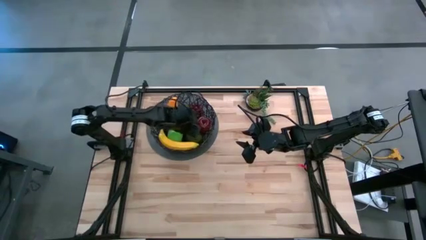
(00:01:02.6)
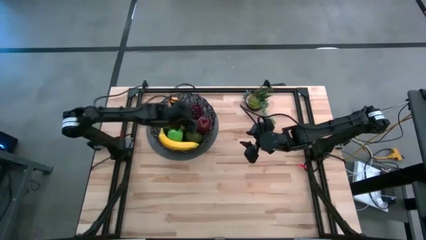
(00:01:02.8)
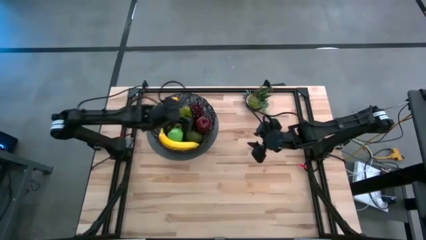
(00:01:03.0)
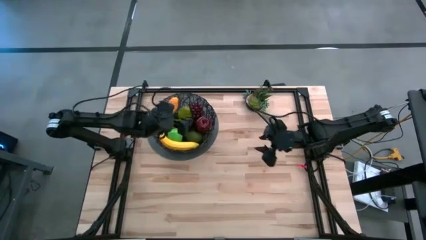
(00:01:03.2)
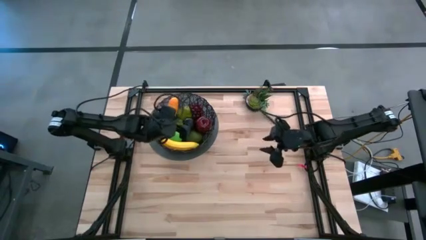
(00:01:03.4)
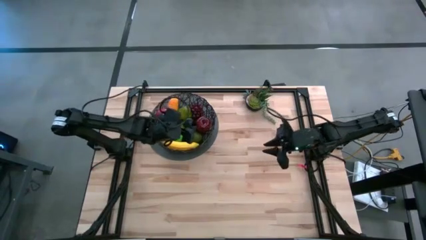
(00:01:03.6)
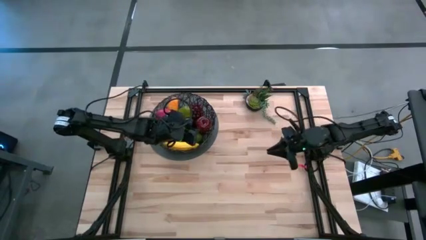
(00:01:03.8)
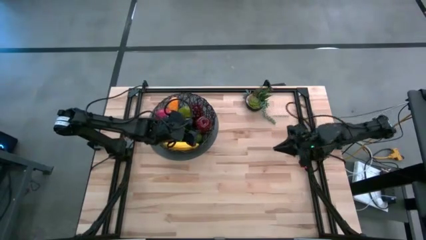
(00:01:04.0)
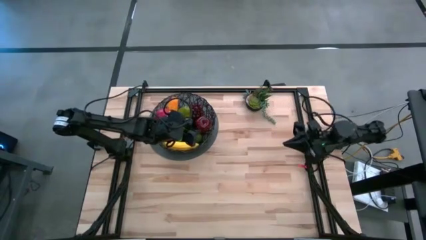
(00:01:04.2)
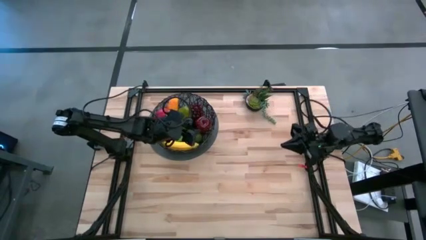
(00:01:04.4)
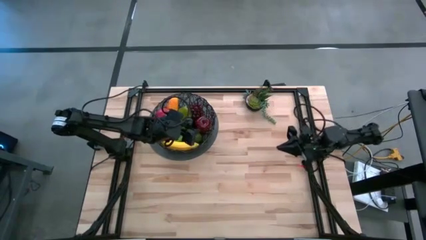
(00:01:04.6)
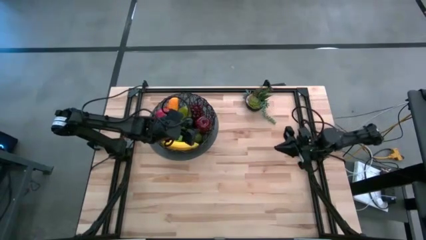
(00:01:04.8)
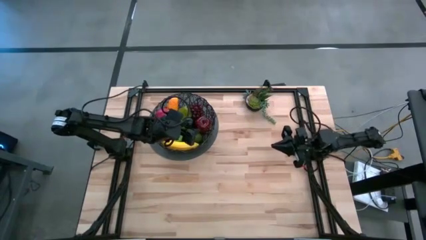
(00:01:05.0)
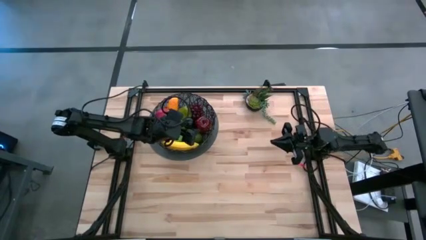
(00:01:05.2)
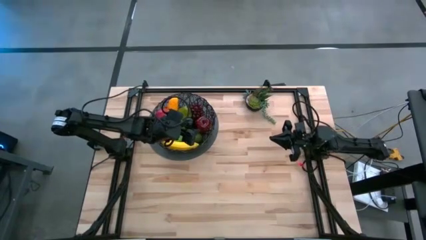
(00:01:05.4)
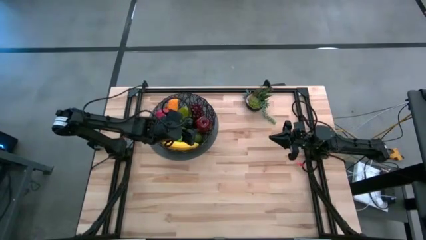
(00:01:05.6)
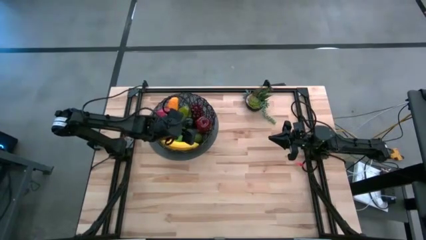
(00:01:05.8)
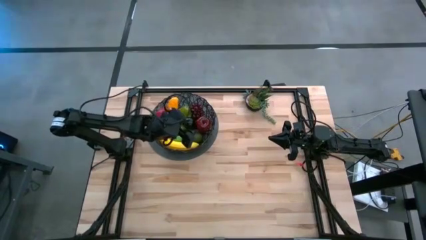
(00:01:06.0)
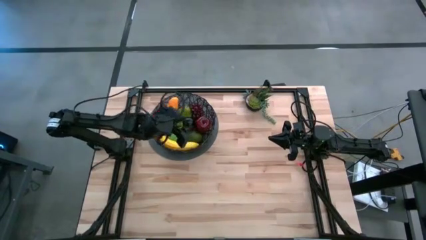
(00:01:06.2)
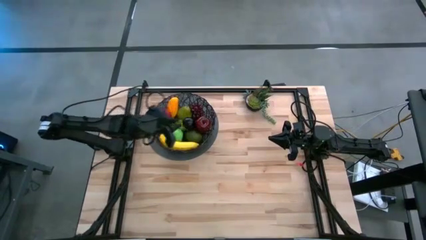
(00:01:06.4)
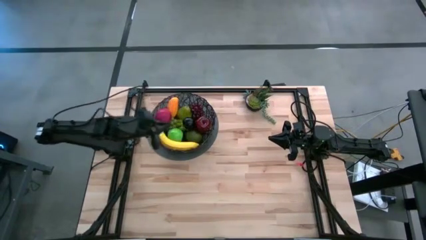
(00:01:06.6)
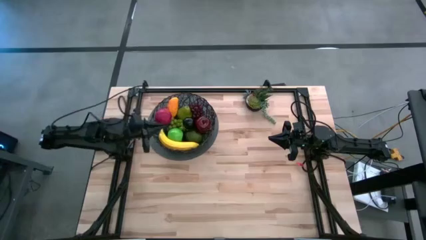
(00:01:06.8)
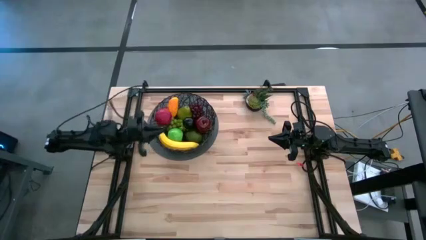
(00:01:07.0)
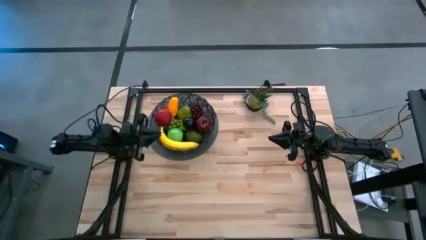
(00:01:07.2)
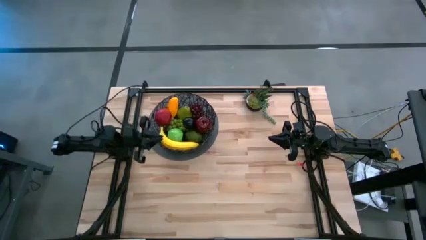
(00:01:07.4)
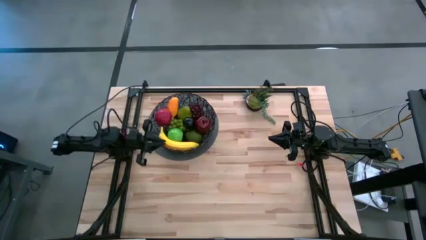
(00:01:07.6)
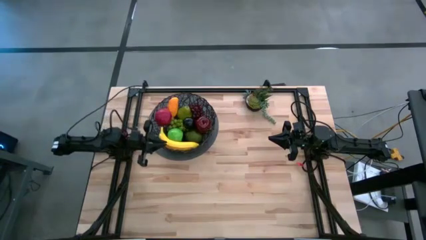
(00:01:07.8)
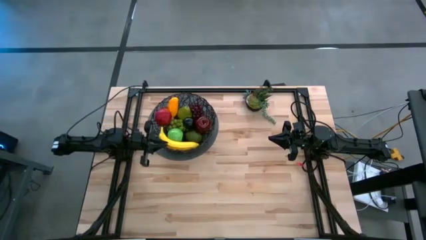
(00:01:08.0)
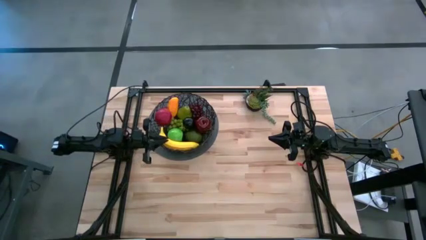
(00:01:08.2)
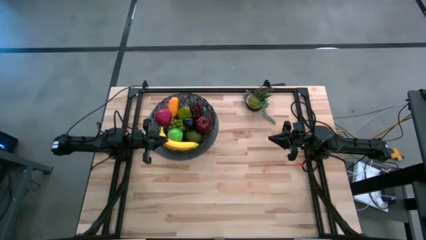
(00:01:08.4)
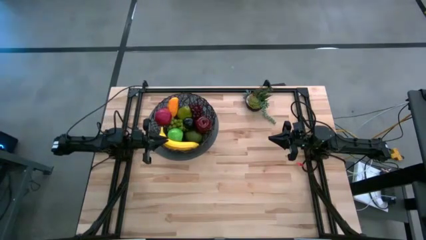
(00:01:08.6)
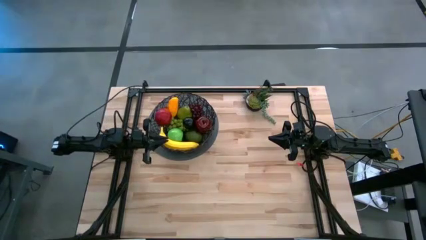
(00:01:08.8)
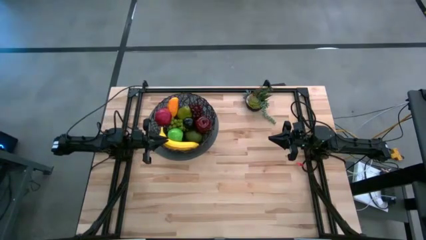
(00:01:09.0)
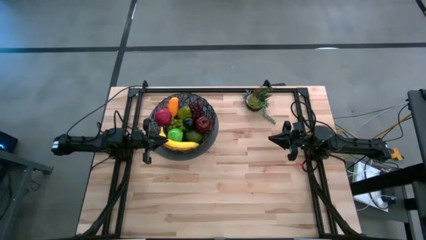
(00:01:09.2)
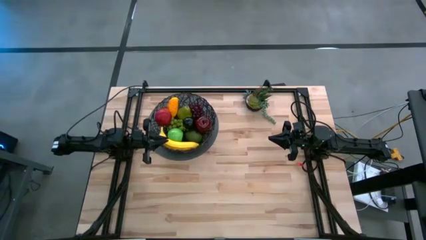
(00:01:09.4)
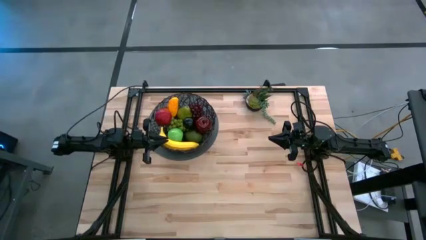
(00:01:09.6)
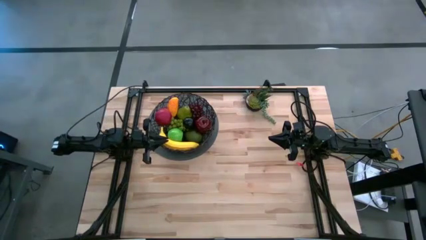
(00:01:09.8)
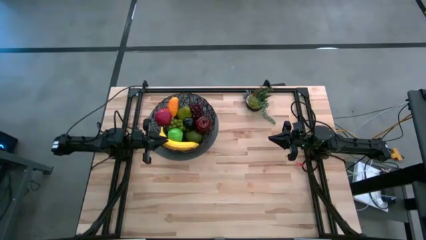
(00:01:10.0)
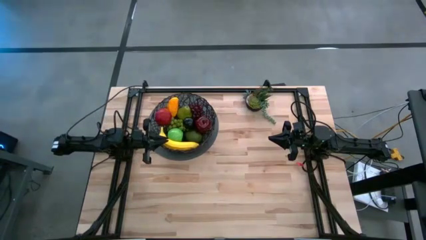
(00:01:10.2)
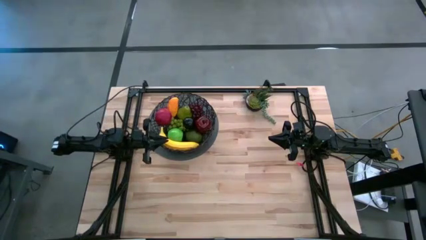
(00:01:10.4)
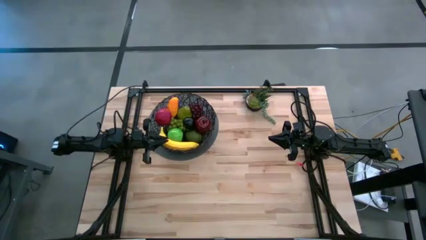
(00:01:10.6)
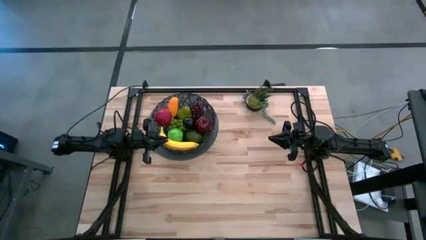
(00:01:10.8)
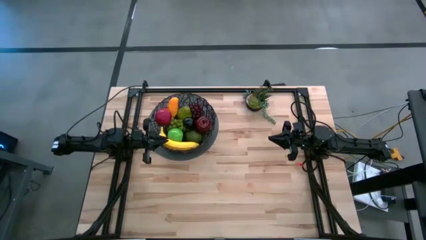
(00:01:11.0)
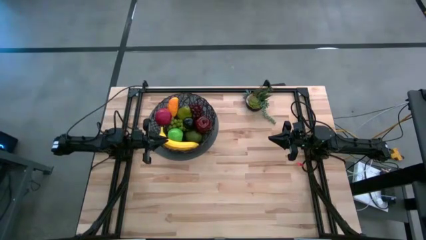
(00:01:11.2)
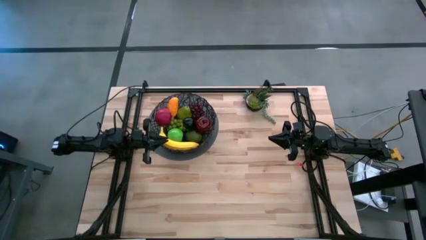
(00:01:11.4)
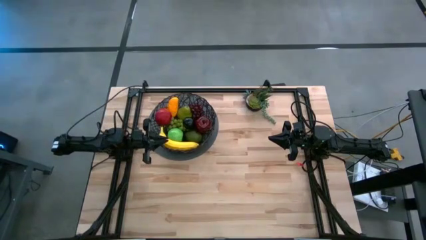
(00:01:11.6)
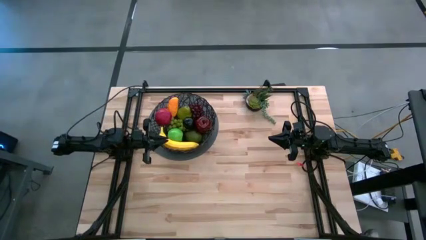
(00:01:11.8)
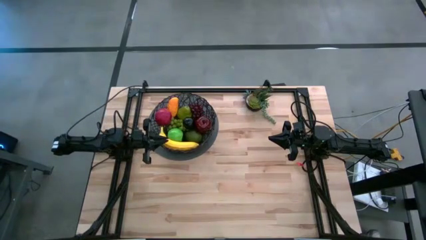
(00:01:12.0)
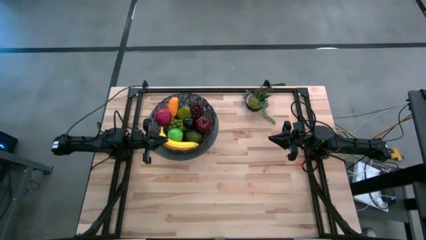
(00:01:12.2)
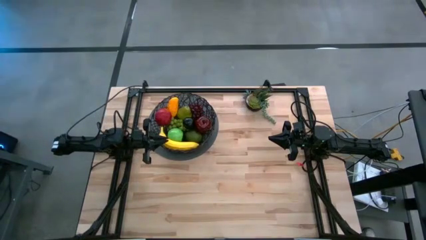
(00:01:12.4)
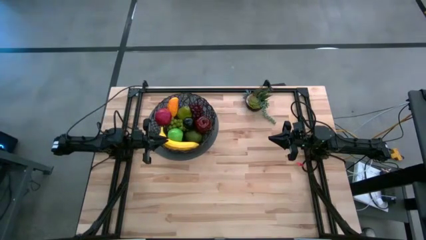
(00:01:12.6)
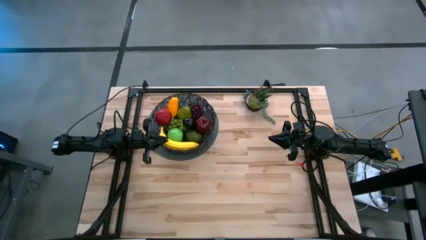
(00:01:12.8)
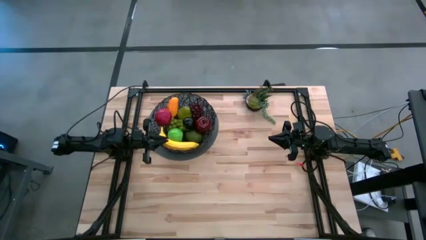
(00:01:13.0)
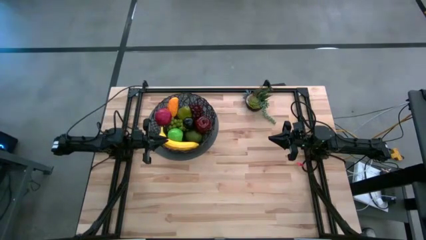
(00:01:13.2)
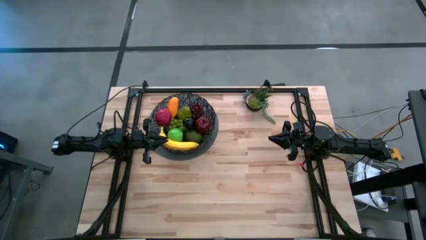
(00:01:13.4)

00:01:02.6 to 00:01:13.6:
Task: Build produce basket
Return to Home Position

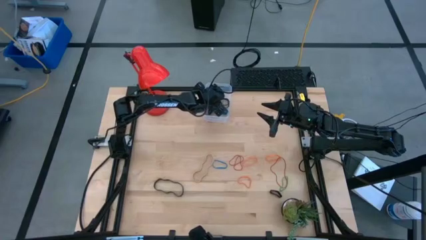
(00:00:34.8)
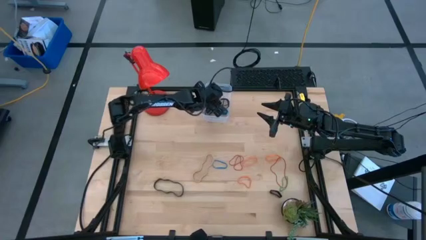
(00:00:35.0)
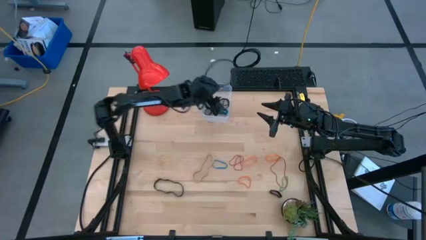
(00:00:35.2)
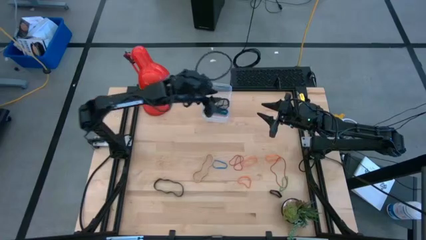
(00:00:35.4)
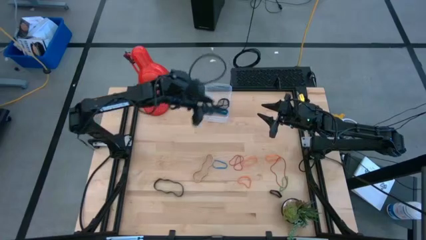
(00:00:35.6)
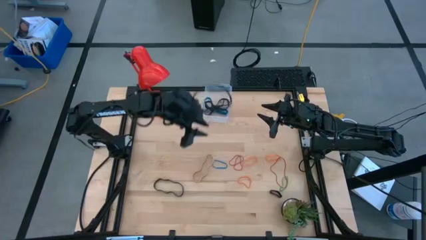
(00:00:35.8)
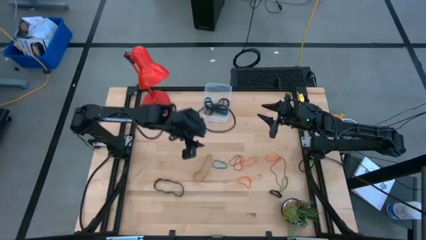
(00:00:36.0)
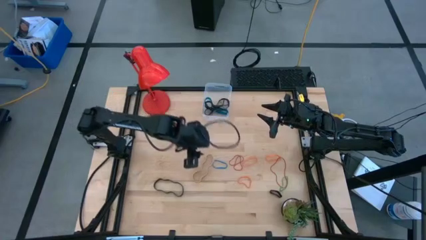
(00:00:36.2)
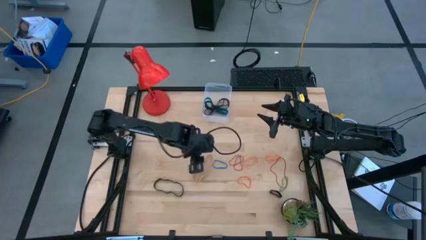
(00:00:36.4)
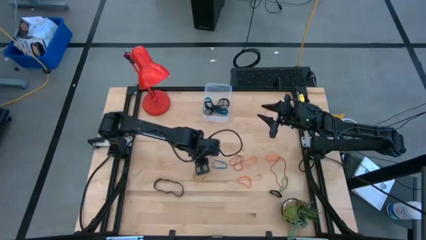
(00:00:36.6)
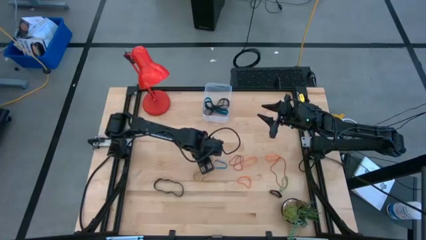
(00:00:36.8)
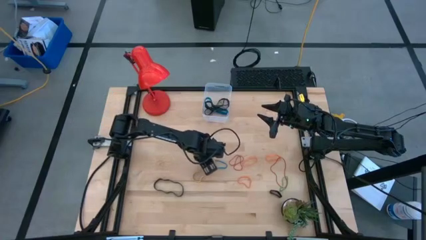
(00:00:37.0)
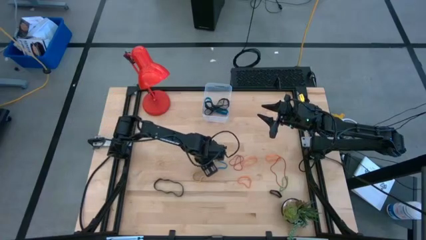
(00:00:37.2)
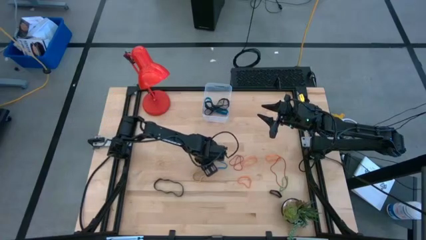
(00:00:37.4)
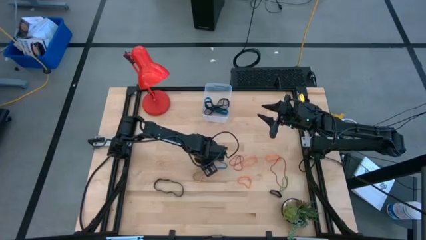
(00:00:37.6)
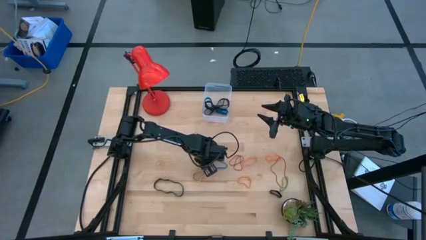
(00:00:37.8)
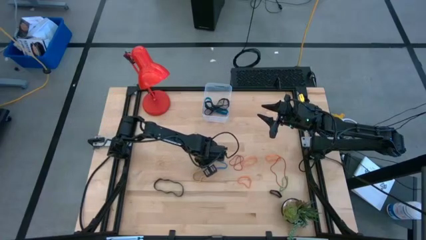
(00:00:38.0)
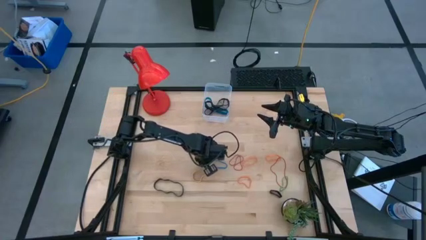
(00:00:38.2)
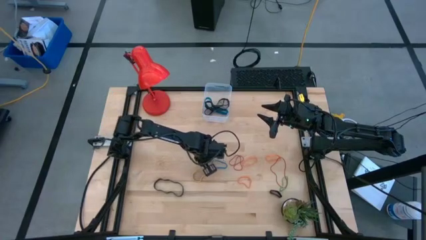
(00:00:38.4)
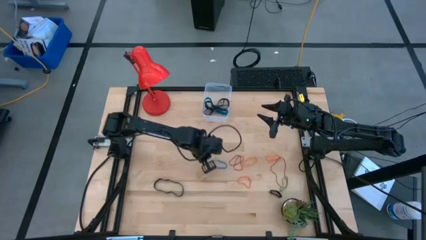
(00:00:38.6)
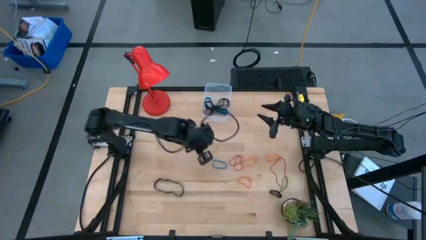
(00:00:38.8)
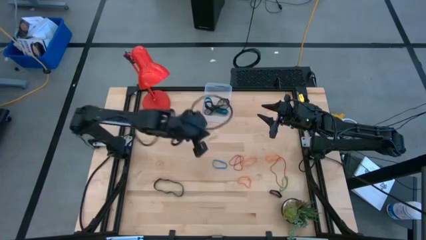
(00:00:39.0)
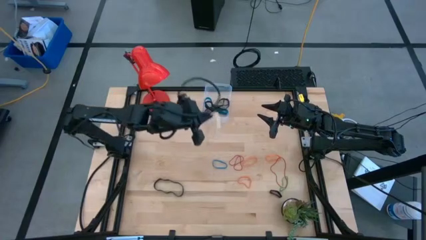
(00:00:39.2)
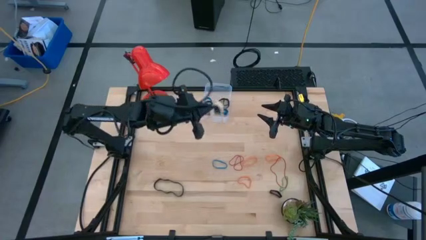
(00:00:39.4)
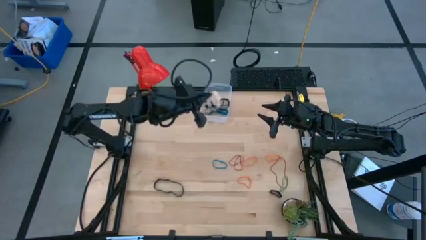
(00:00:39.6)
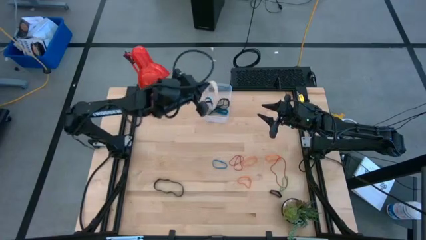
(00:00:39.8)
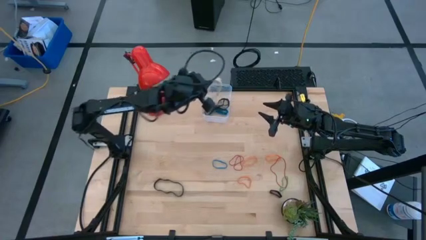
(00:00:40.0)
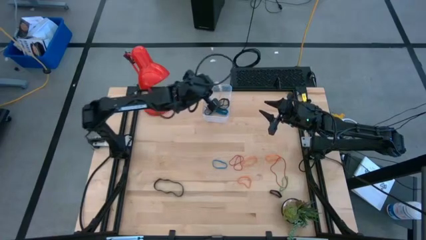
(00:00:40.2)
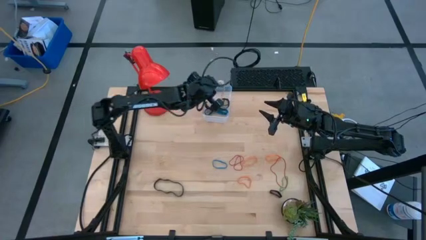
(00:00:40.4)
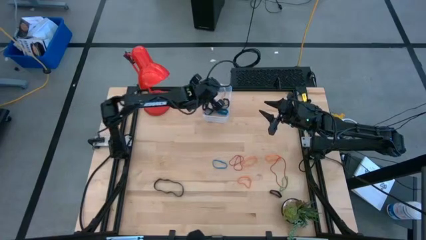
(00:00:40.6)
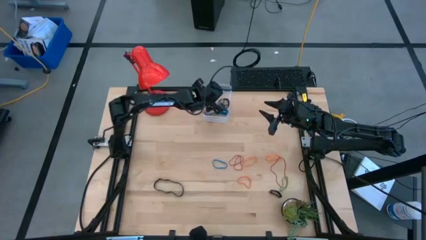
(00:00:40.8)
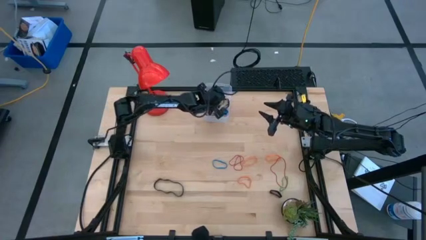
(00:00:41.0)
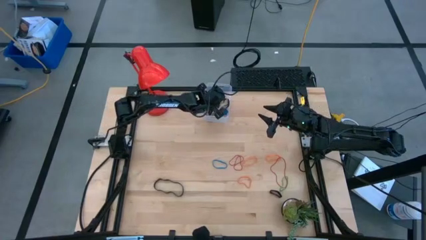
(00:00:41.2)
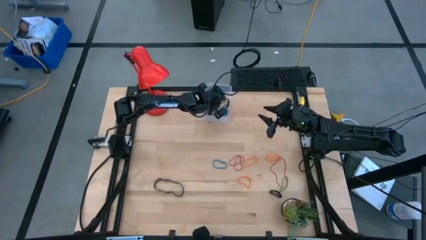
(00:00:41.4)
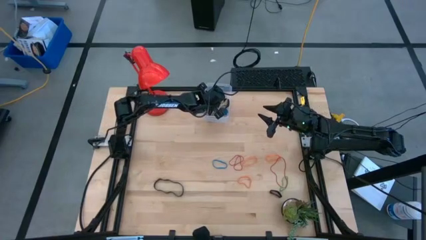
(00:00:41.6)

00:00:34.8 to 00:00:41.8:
Task: Pick and place rubber bands into bin
Put the light brown rubber band into the transparent bin
